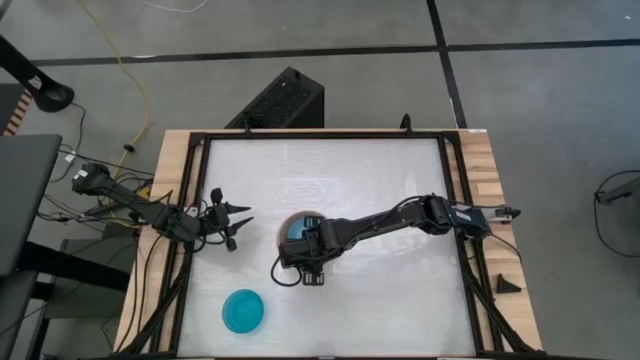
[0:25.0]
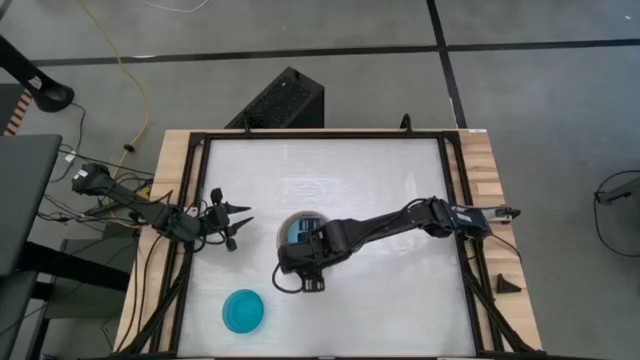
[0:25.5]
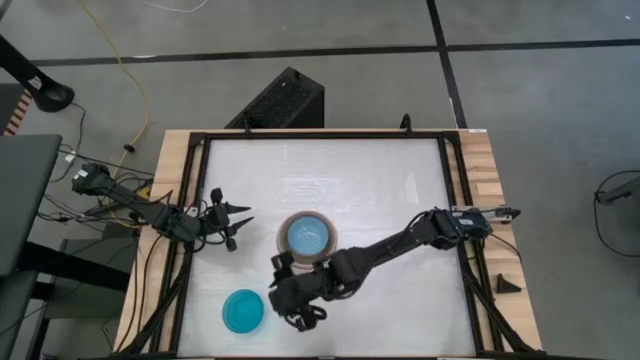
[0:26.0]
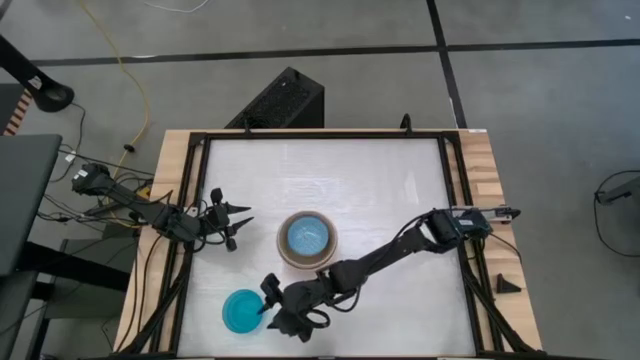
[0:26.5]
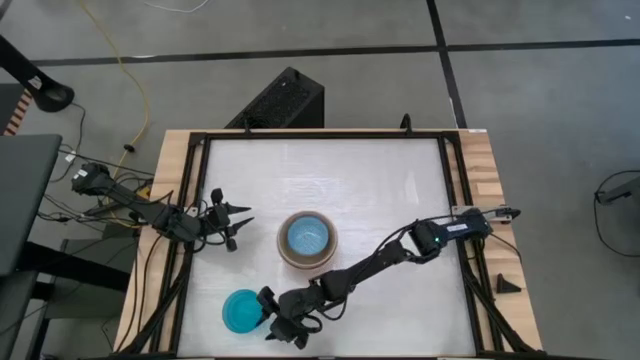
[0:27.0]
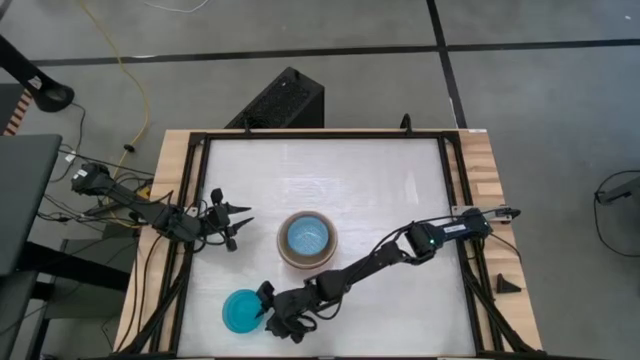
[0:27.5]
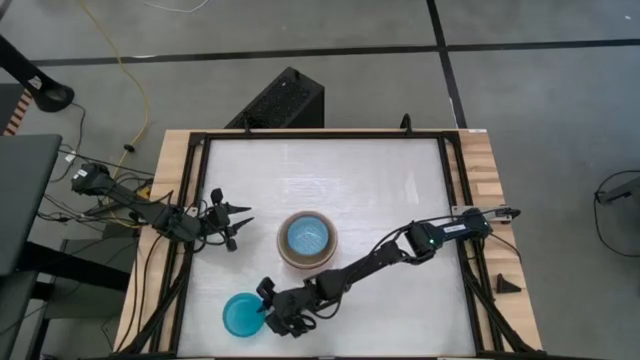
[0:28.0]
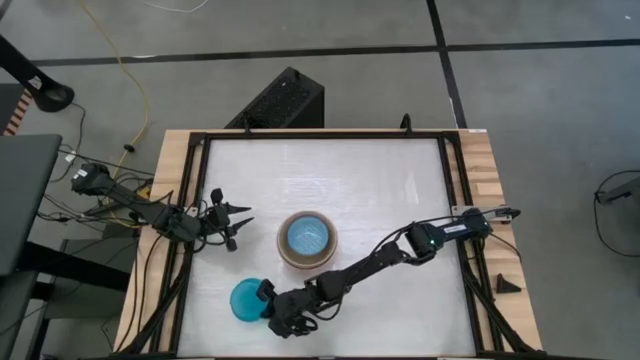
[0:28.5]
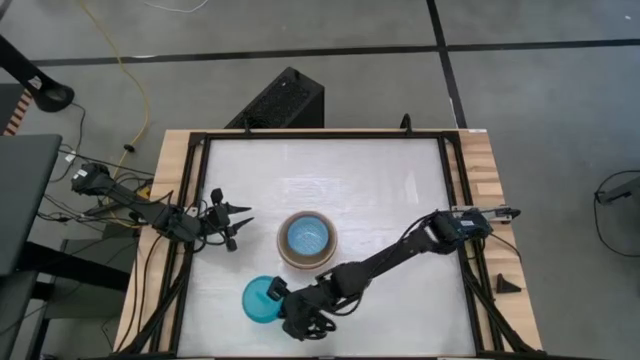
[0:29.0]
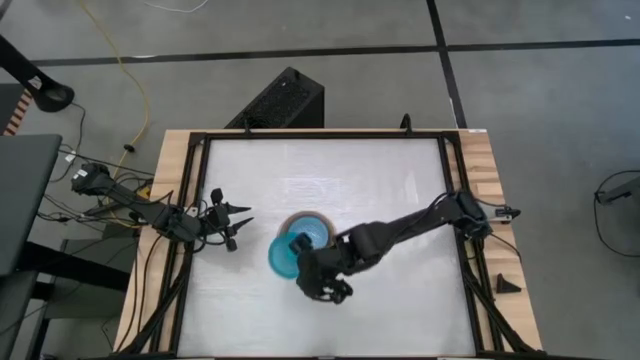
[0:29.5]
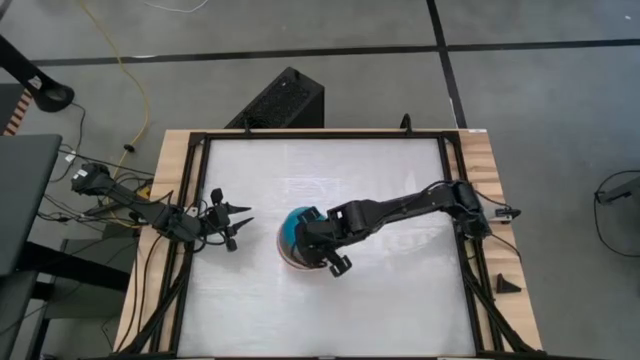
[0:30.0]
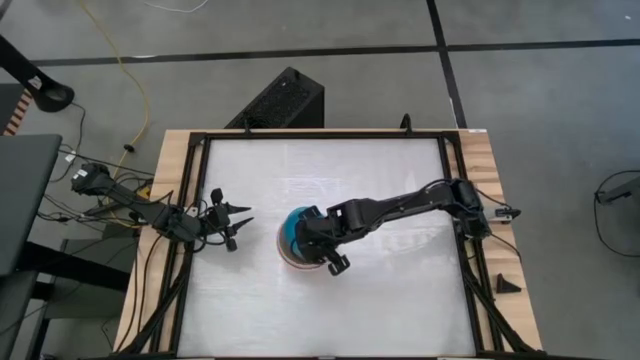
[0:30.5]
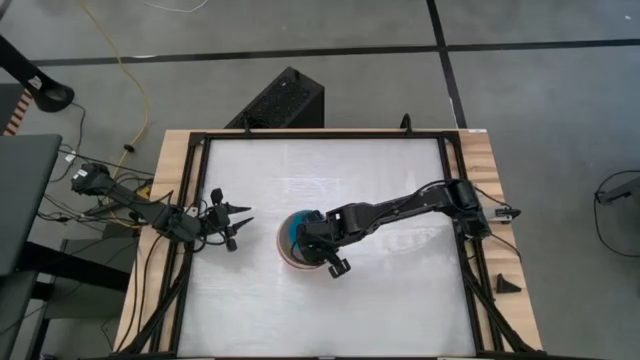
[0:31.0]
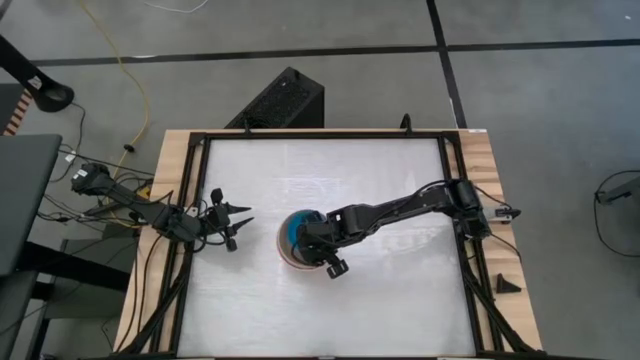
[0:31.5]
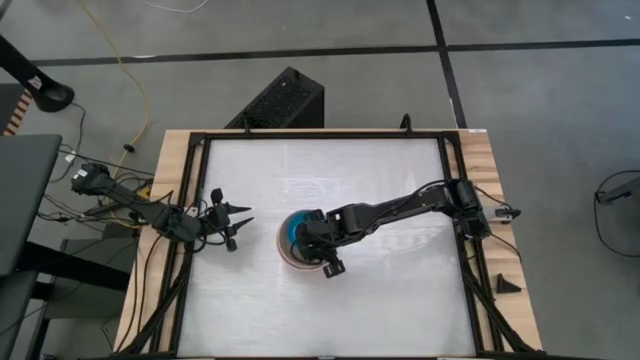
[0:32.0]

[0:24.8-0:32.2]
Stack the blue bowl on the blue patterned bowl

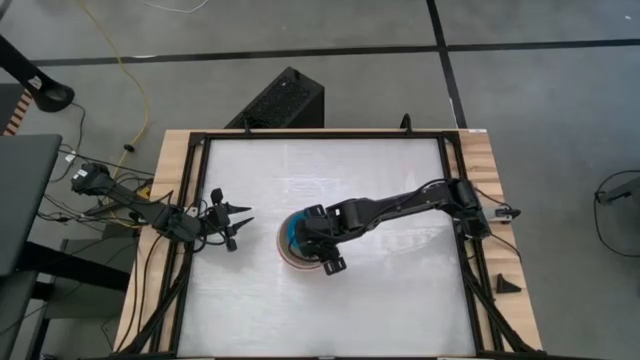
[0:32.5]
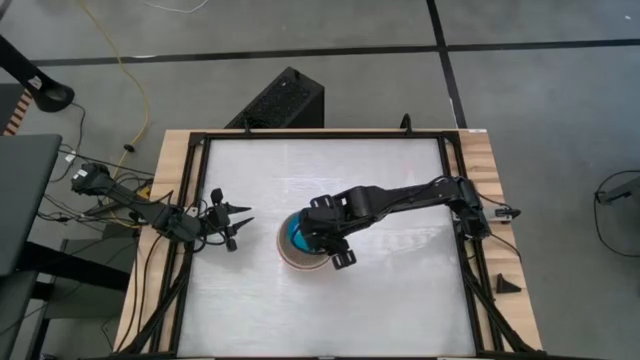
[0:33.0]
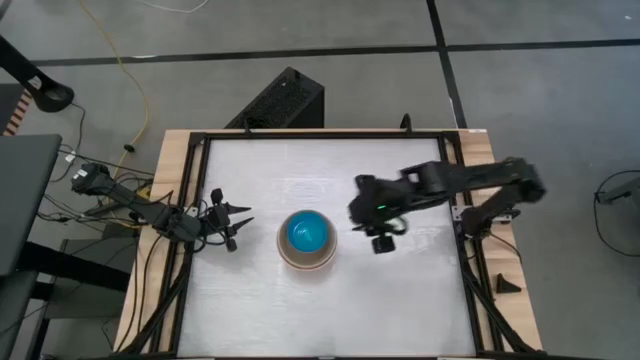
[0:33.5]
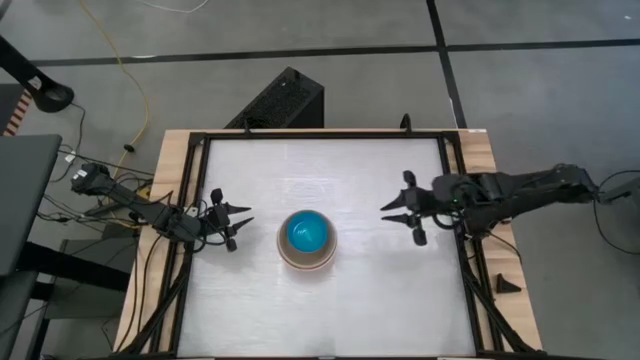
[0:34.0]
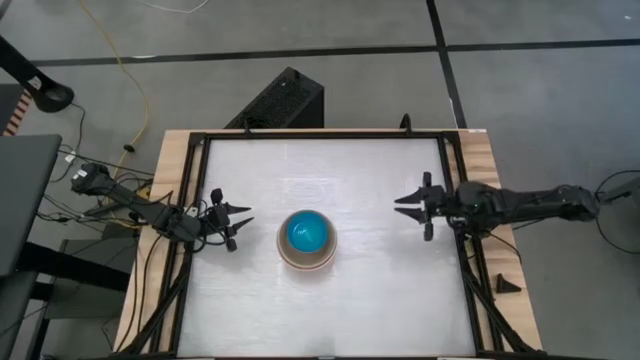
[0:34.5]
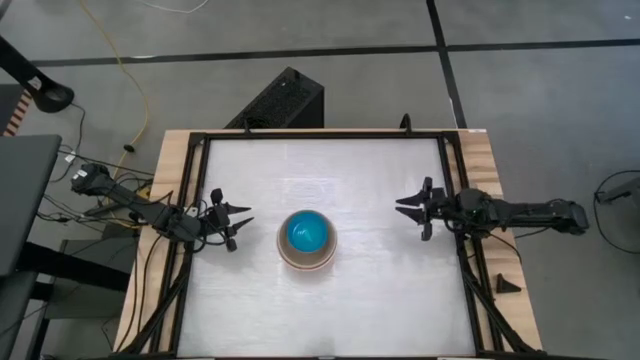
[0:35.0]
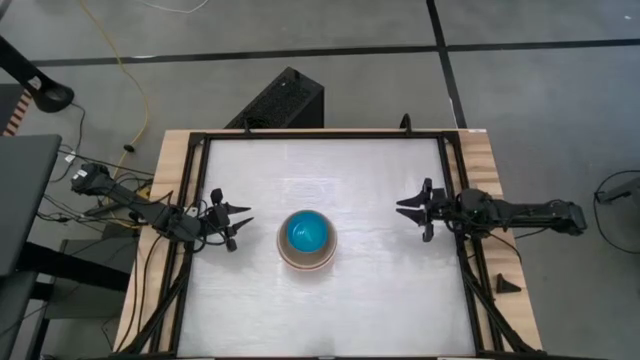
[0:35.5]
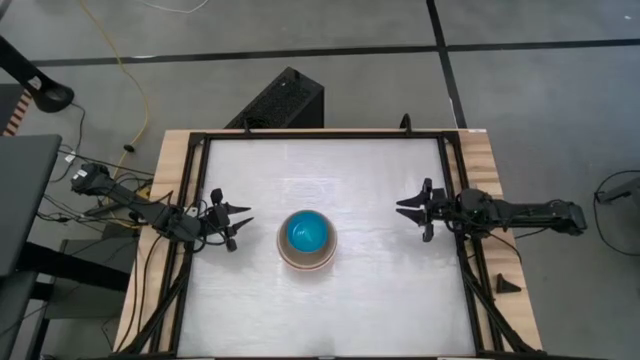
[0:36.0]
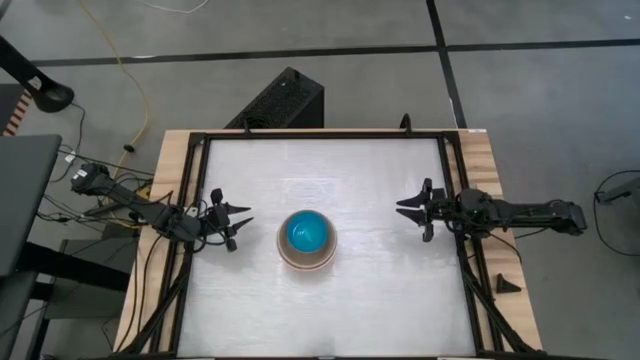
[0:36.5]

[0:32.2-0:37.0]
Return to Home Position

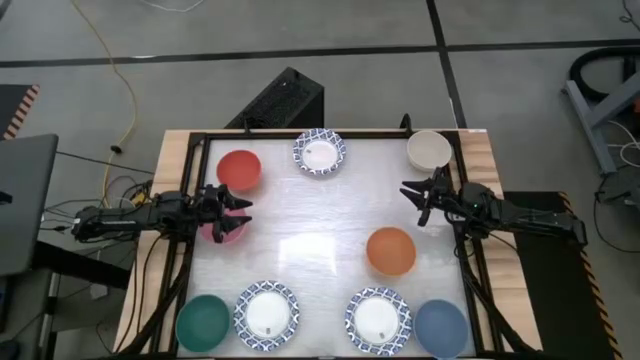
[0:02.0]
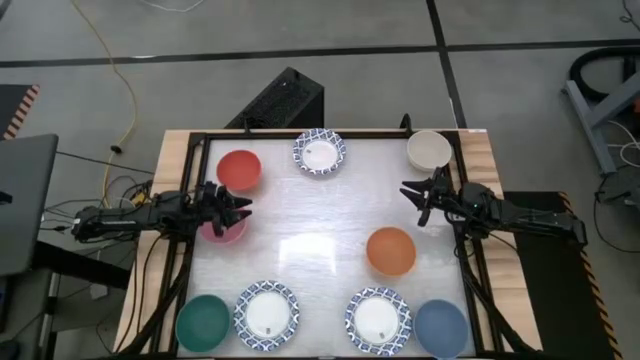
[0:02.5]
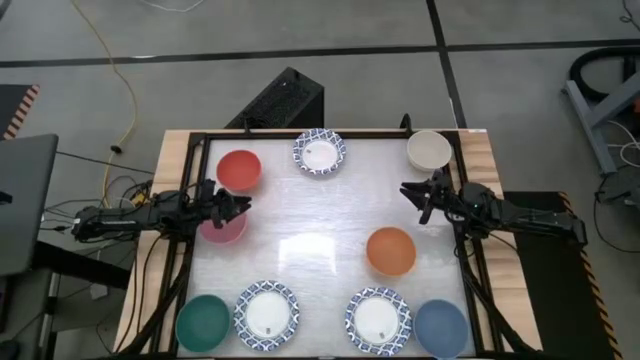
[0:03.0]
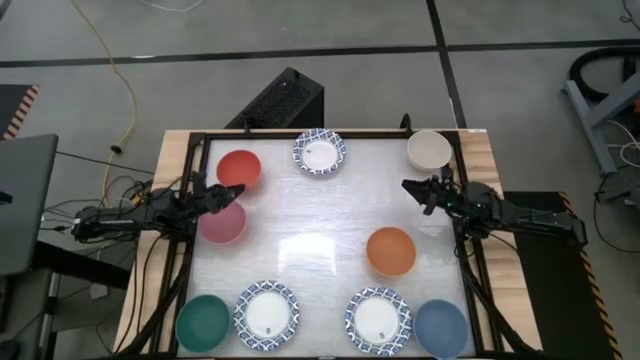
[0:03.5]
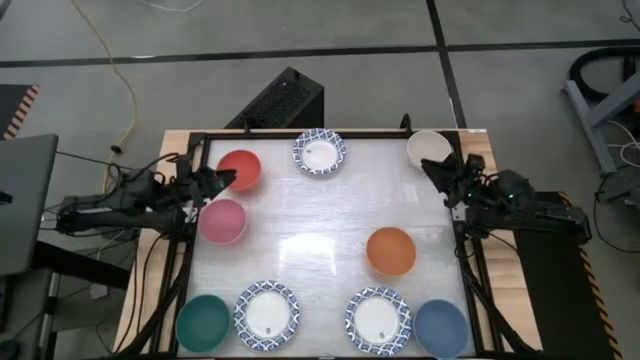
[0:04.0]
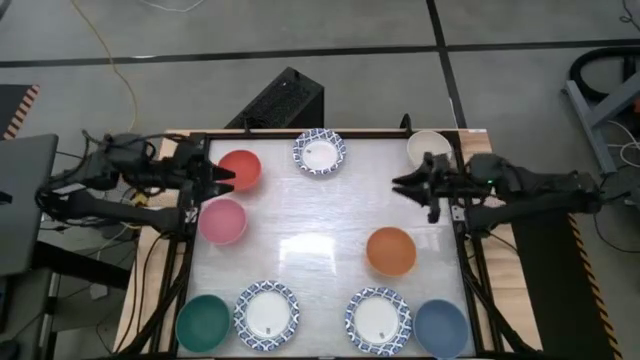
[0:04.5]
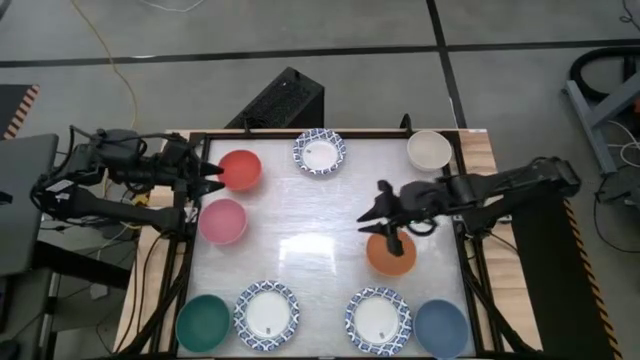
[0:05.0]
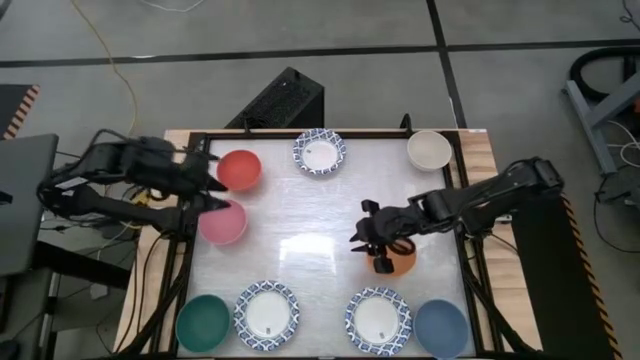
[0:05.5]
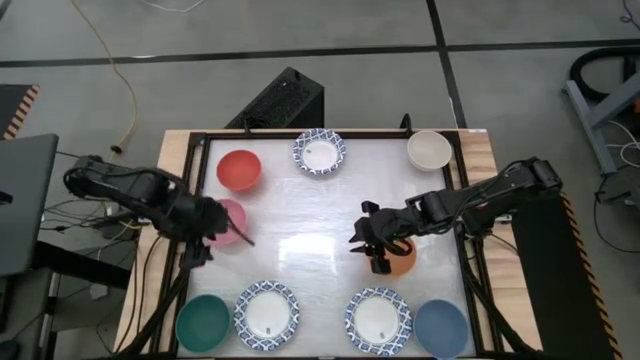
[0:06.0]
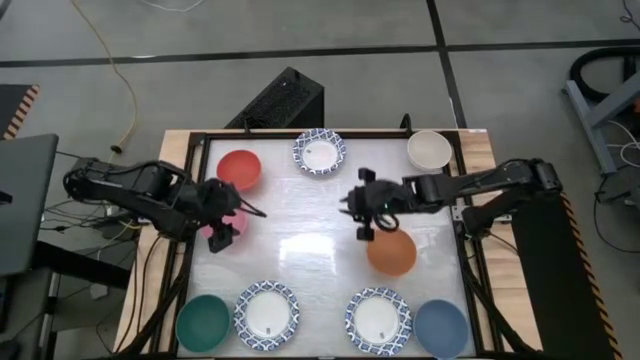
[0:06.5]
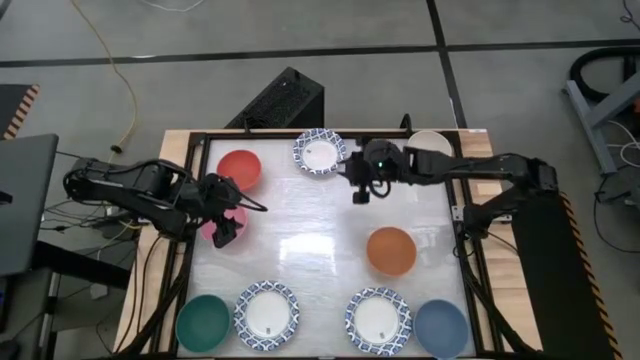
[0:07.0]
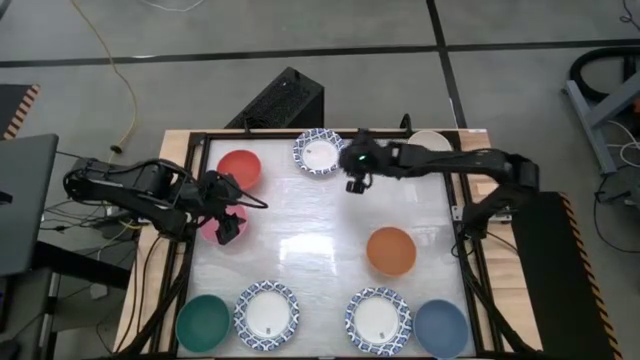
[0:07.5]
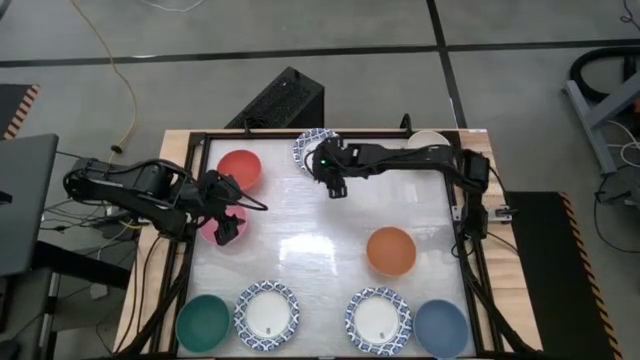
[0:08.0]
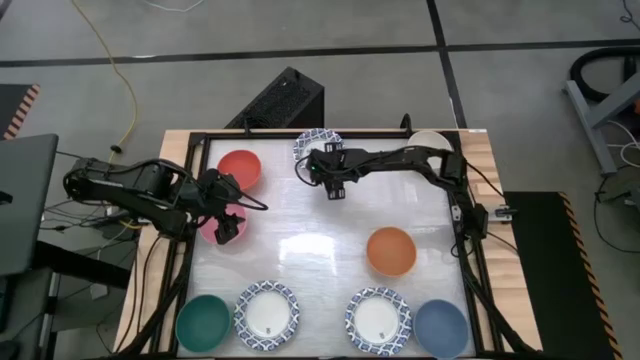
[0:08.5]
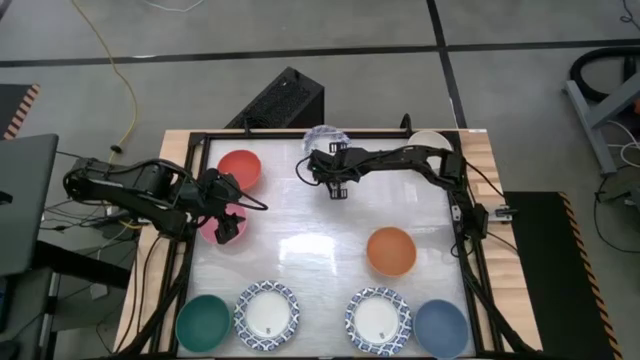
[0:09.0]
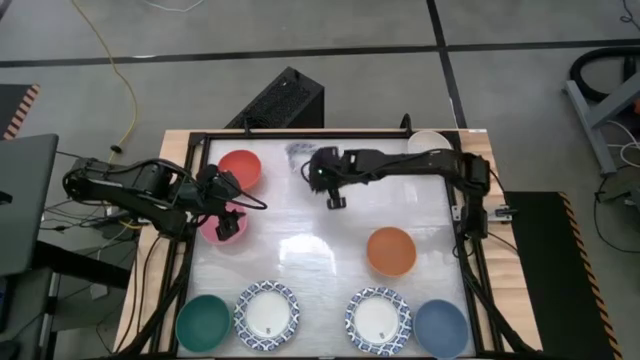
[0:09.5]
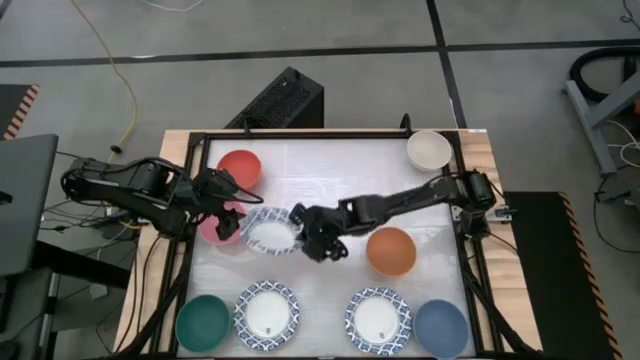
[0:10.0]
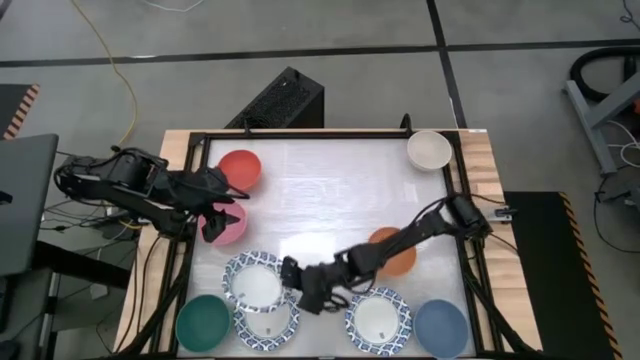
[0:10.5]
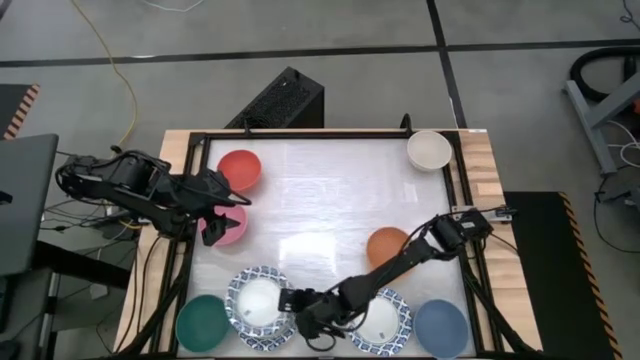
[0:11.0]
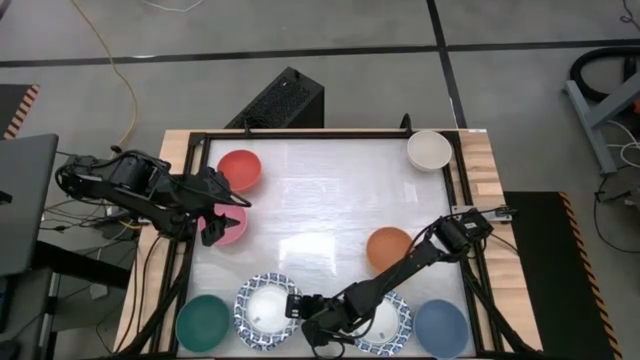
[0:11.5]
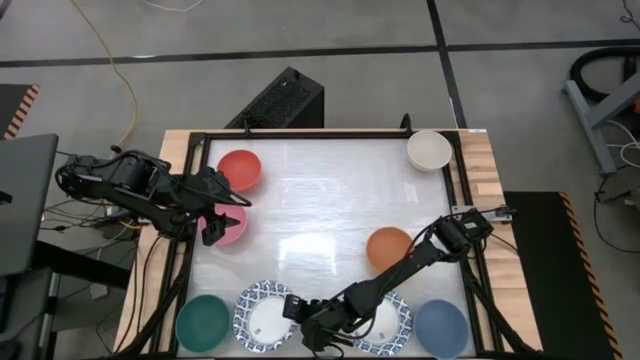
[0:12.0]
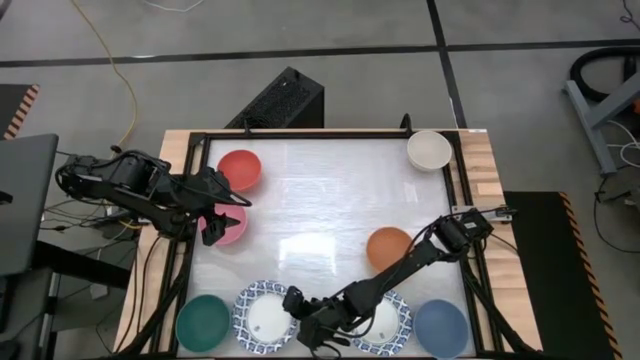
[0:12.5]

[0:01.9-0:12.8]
Stack the white striped bowl on the white striped bowl
